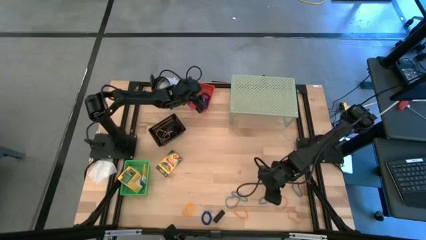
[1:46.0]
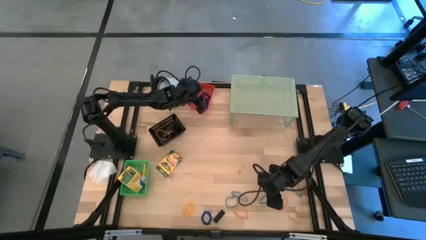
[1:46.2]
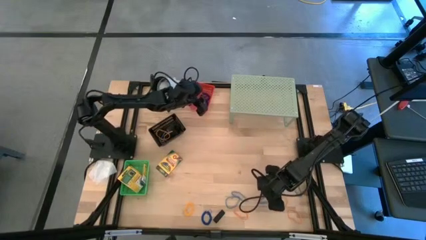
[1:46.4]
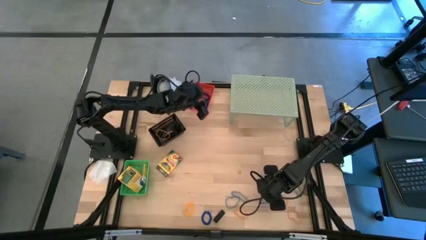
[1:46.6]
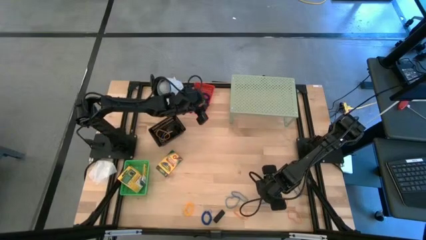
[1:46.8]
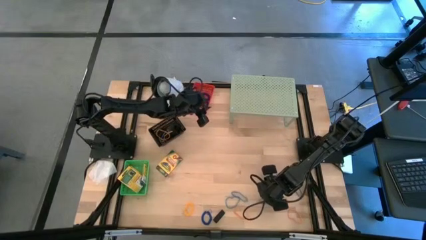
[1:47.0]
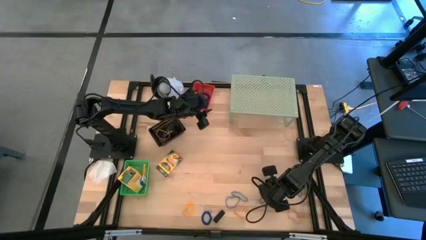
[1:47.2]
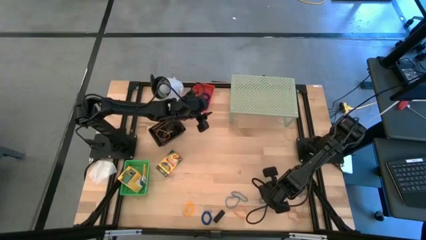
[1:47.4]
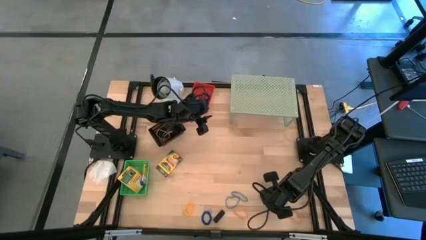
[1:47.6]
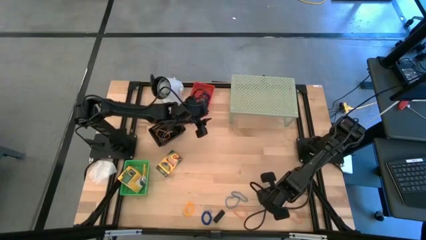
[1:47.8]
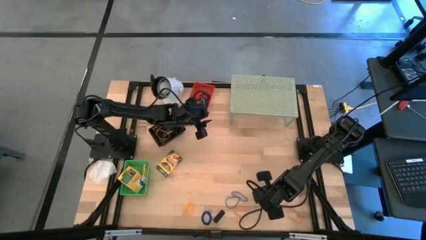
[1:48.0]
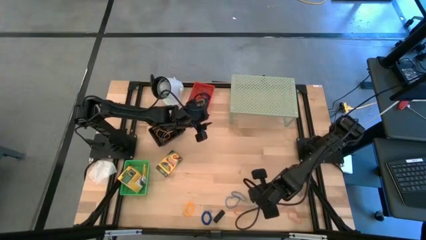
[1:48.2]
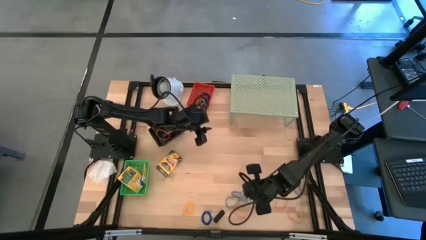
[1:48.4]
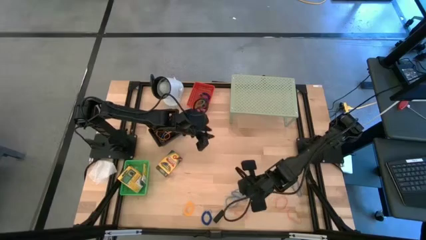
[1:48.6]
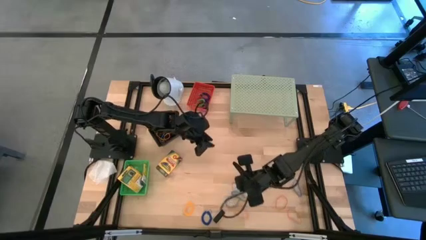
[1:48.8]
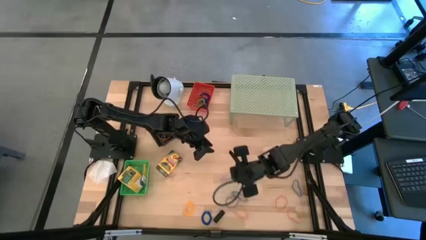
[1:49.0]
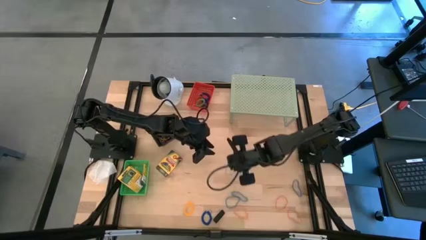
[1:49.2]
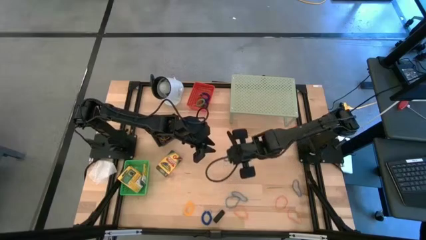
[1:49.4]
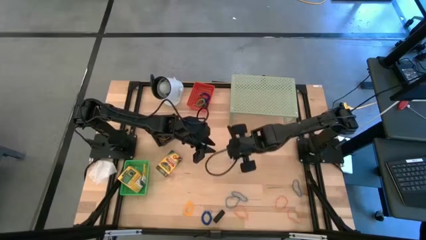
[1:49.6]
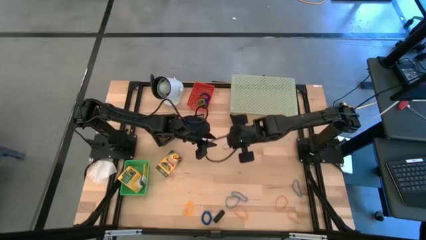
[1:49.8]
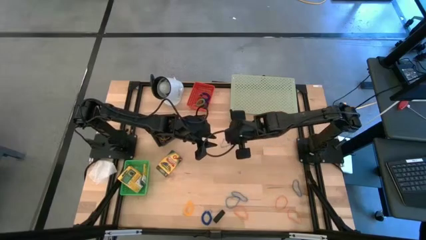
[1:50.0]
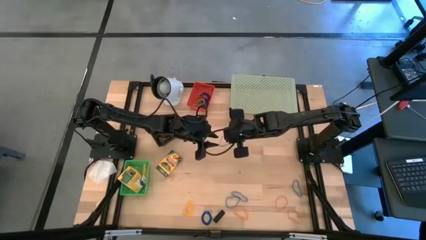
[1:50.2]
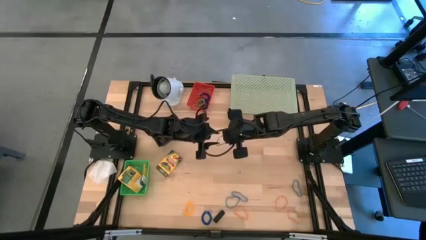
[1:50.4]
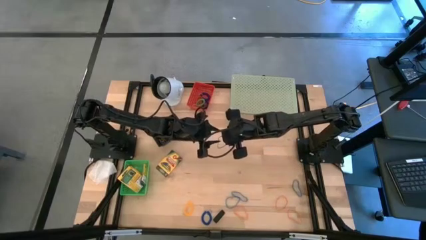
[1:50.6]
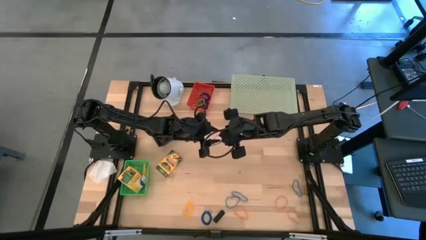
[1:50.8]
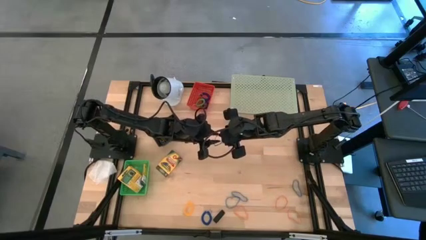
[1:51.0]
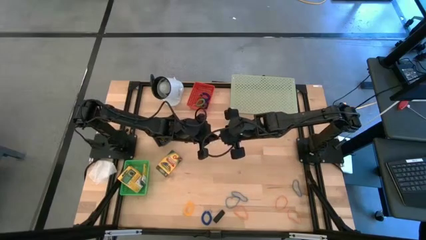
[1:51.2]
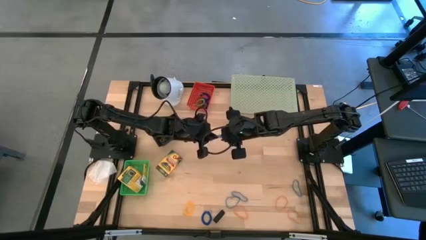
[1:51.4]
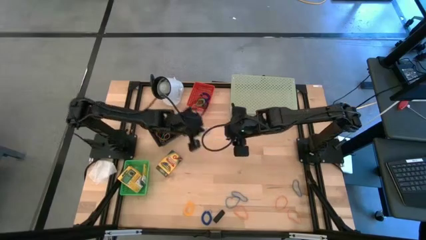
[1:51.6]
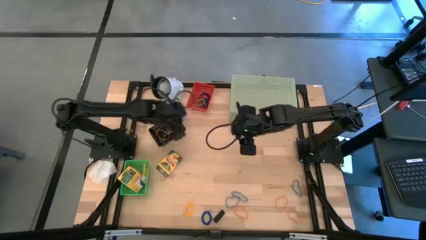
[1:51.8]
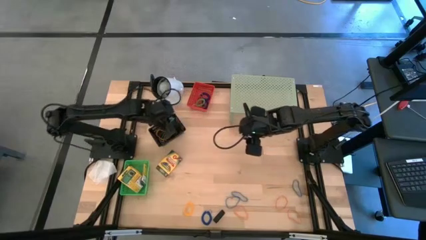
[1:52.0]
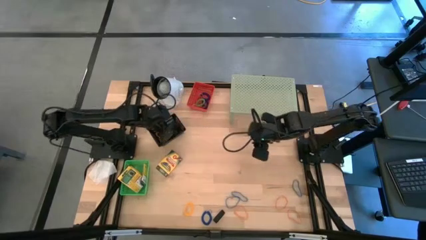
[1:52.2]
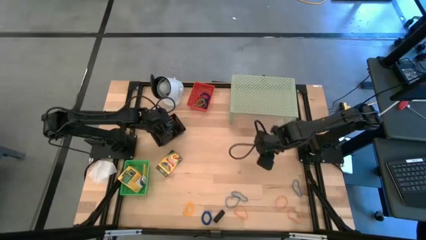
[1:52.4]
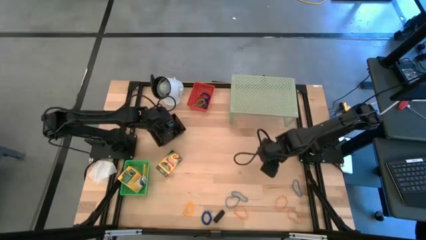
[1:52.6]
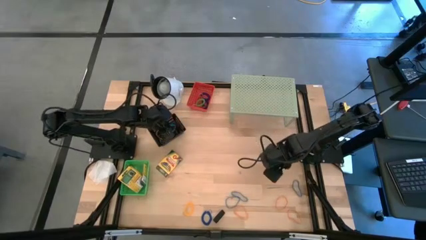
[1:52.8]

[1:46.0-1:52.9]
Task: Pick & Place Office Desk Supplies
Put the blue rubber band into the black bin

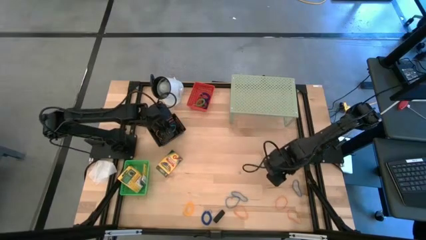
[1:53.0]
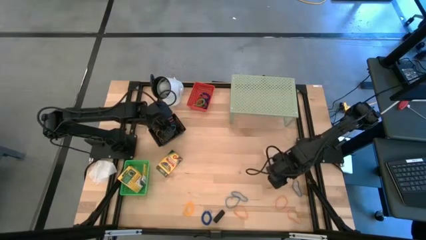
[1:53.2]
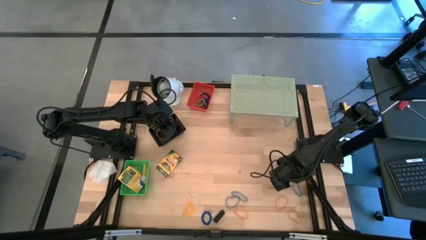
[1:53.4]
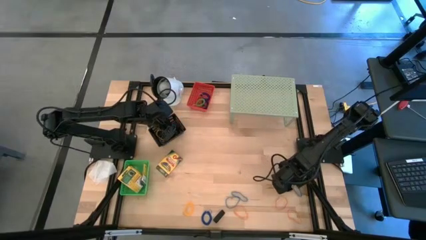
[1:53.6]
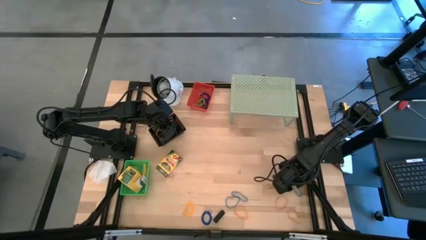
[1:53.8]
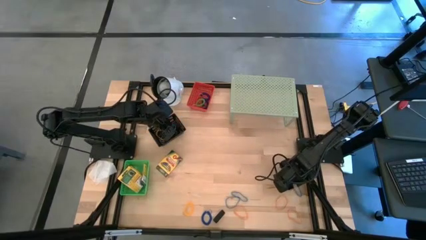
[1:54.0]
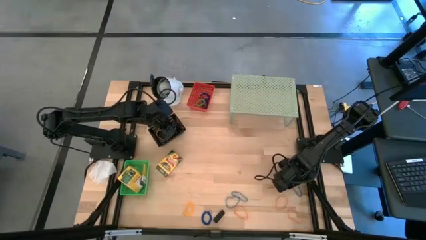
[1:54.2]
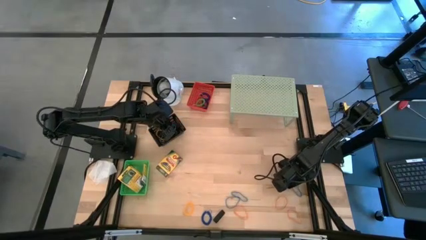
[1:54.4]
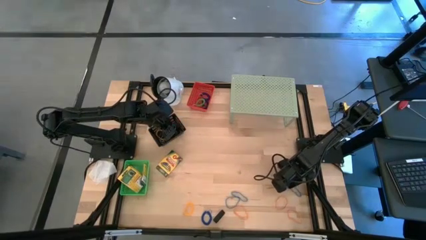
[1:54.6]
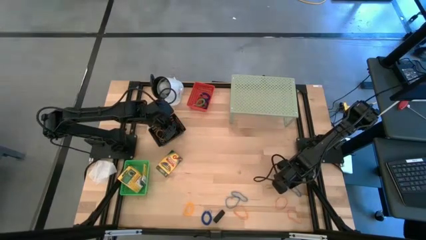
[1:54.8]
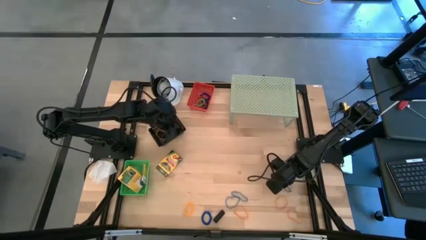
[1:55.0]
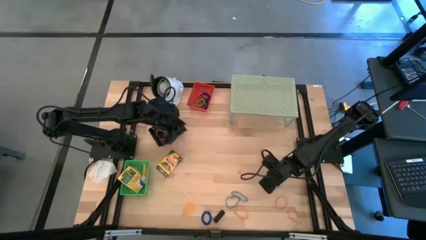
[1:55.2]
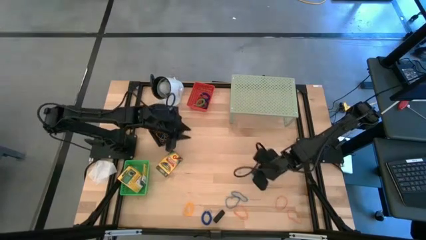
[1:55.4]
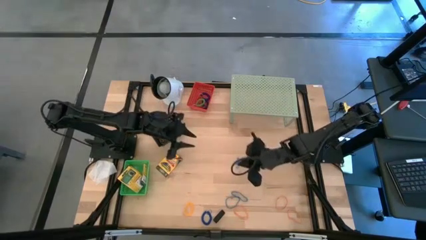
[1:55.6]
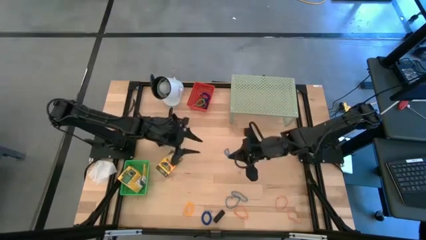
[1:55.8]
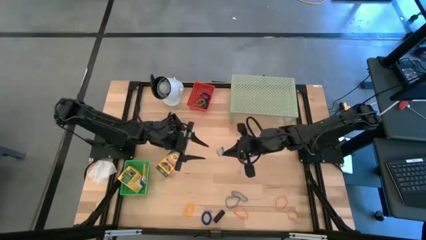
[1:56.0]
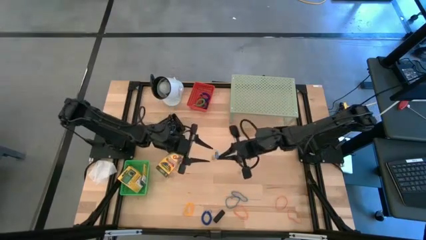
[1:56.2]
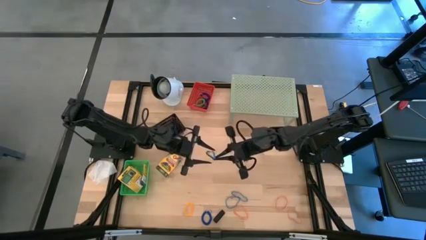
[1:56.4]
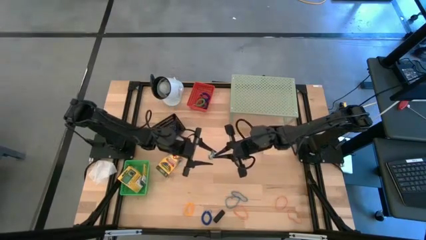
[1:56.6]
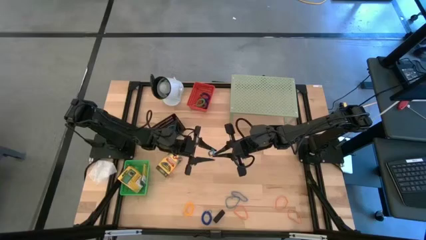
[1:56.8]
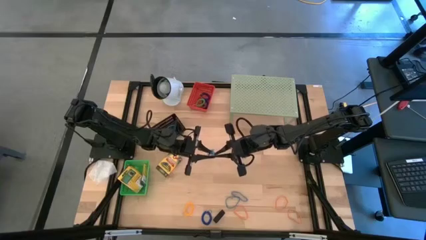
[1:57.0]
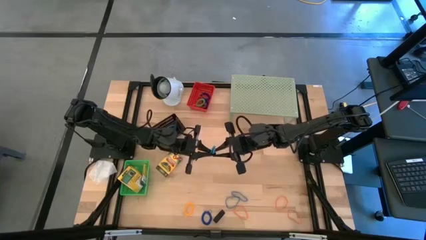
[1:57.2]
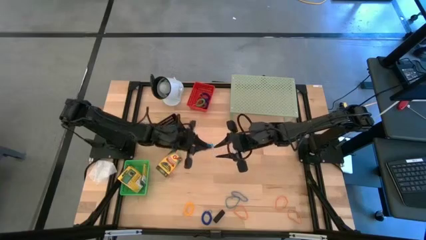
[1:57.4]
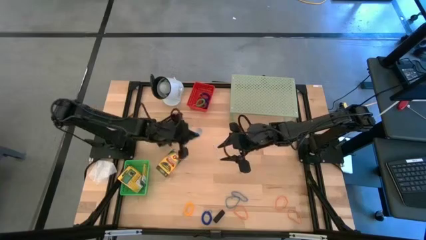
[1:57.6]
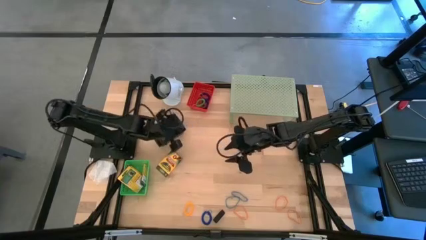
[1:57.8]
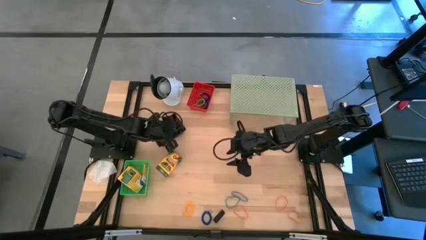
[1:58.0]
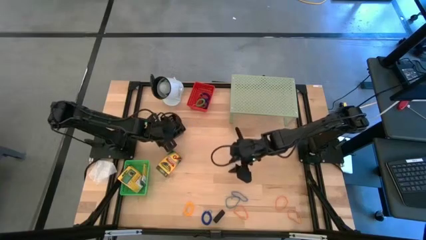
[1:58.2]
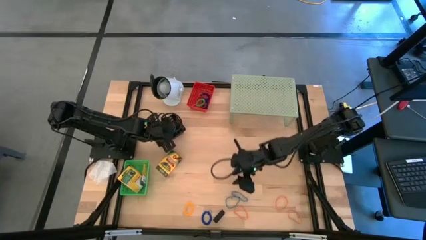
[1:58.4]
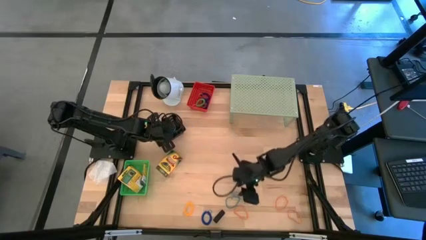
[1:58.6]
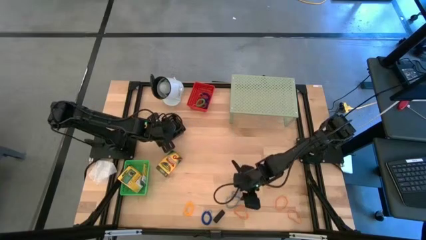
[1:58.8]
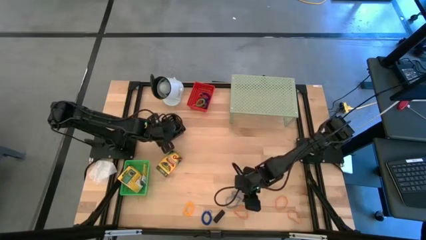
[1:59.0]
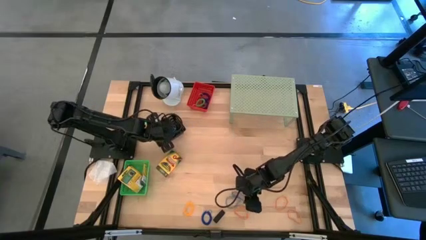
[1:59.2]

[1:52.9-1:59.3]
Put the blue rubber band into the black bin

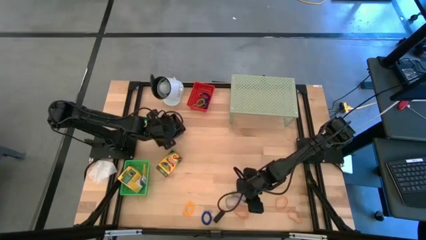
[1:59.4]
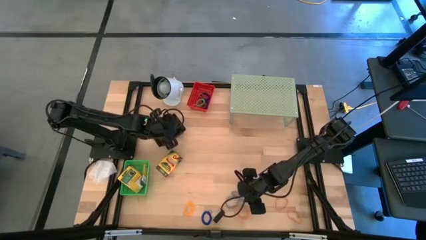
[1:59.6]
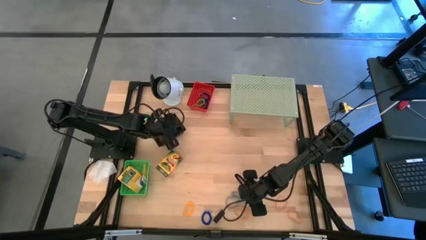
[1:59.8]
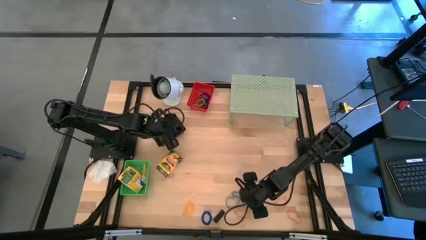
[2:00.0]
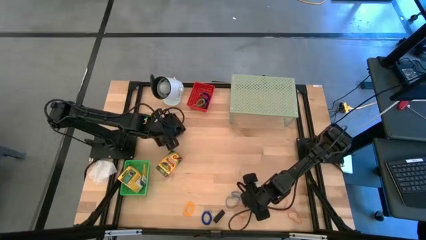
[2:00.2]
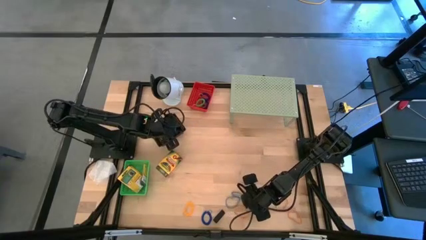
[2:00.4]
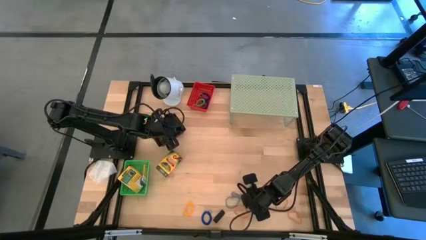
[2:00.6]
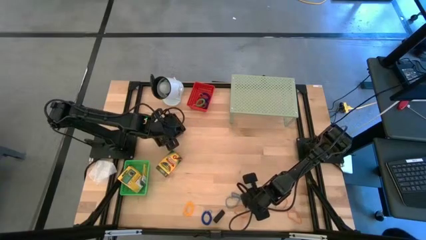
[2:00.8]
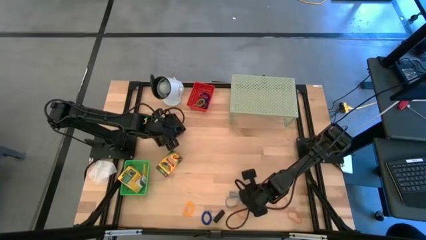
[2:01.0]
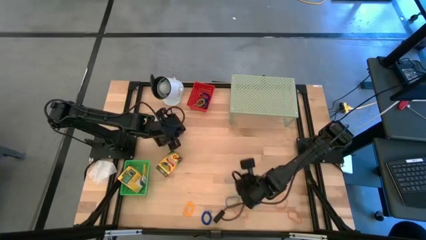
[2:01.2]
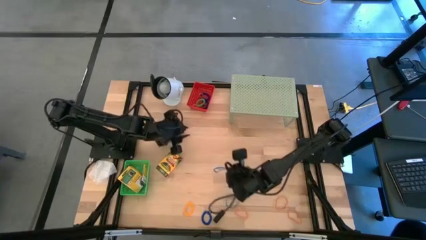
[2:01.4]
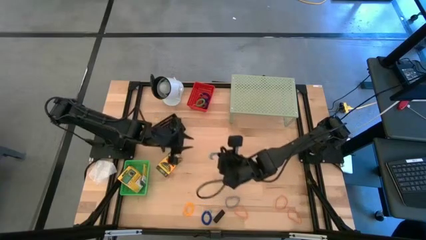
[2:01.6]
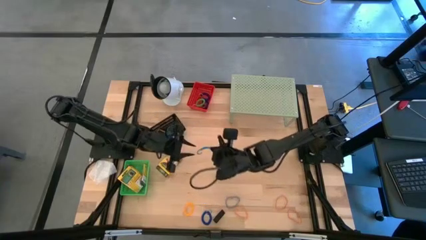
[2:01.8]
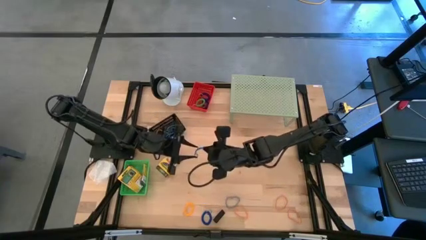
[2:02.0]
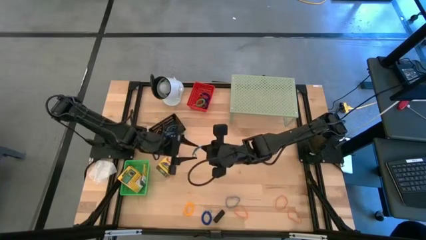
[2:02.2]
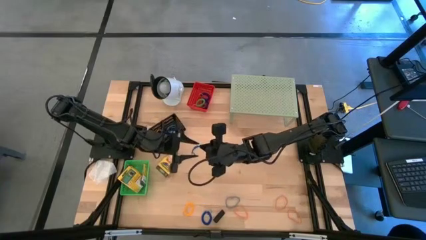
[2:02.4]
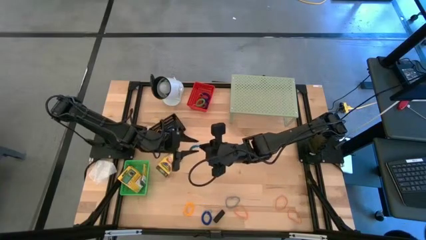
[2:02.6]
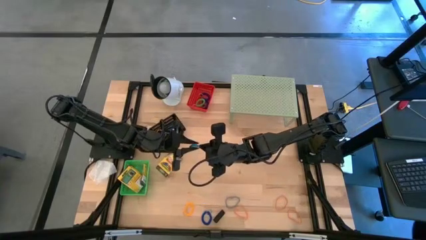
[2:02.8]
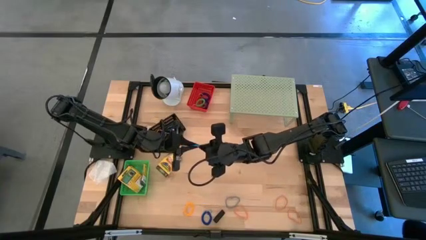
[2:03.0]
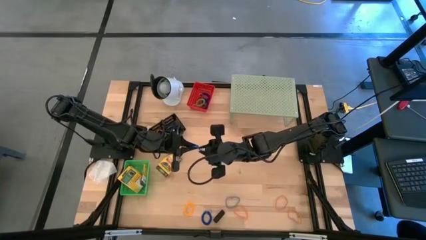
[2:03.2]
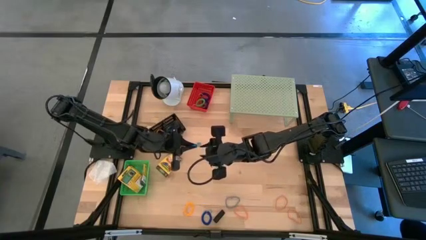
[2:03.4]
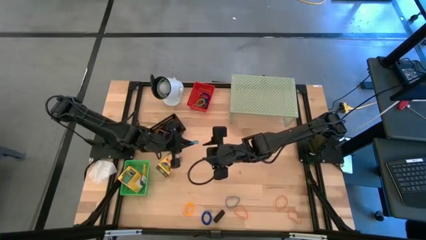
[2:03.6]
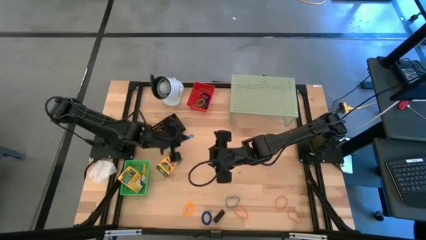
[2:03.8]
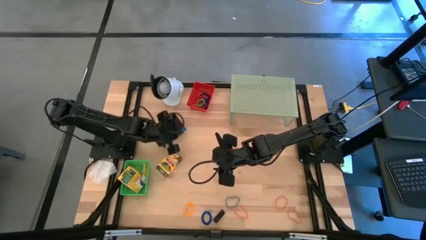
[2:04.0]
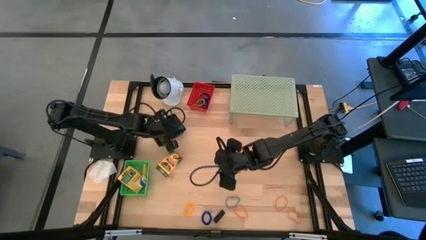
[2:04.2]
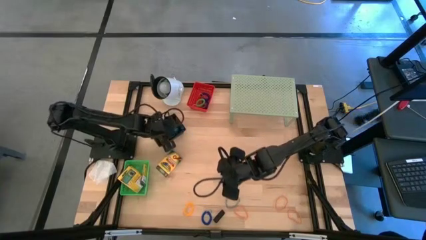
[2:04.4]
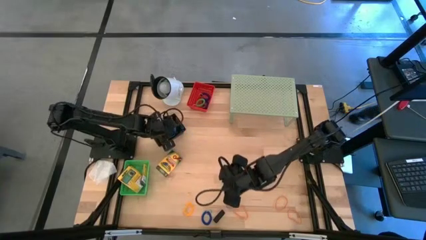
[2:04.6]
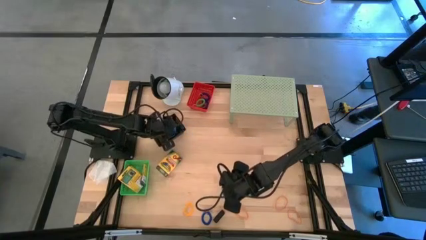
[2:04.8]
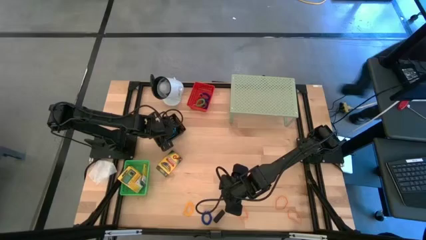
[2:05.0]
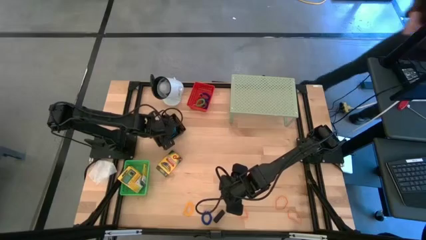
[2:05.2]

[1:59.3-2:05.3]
Put the blue rubber band into the black bin
